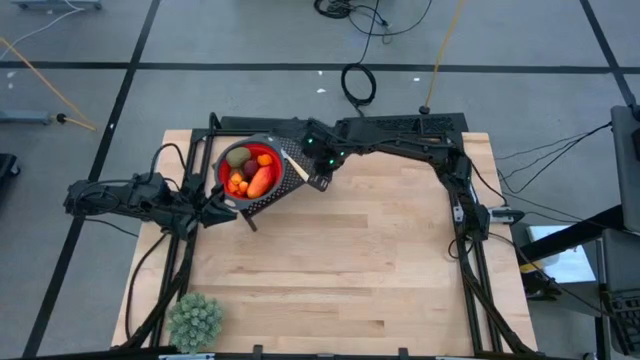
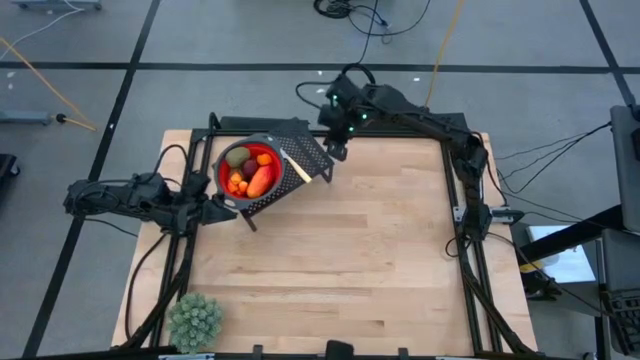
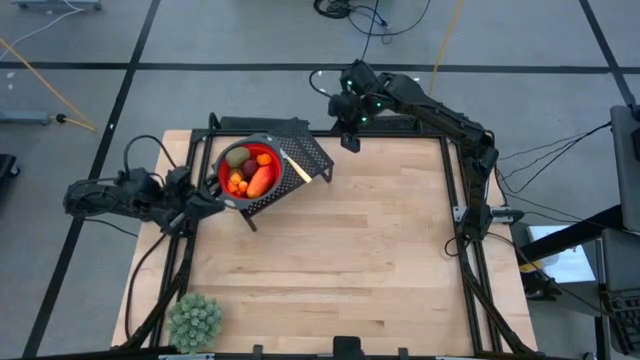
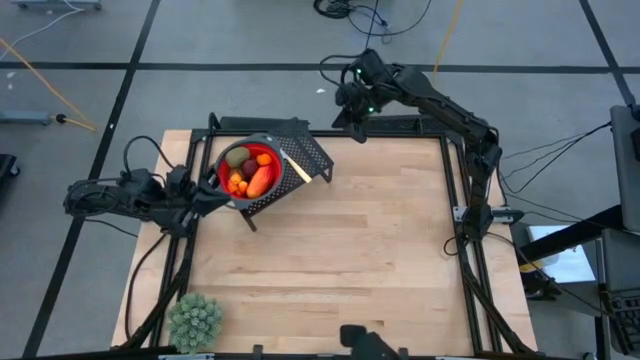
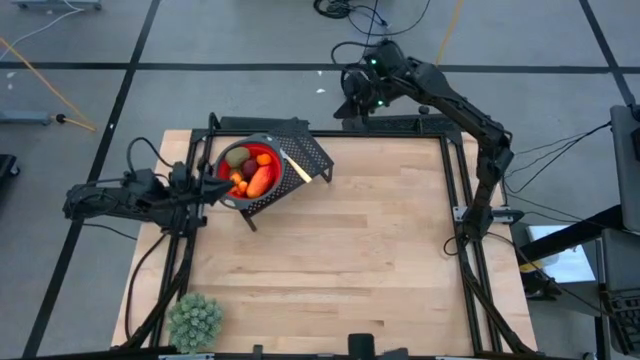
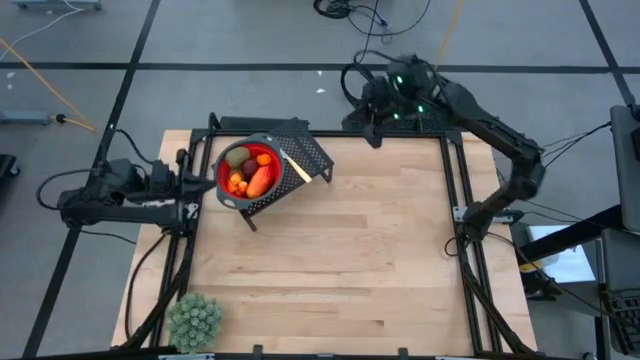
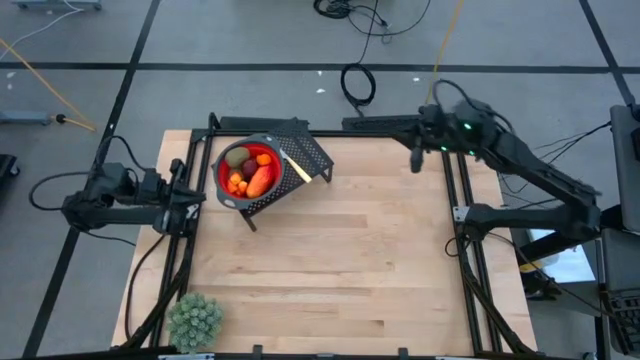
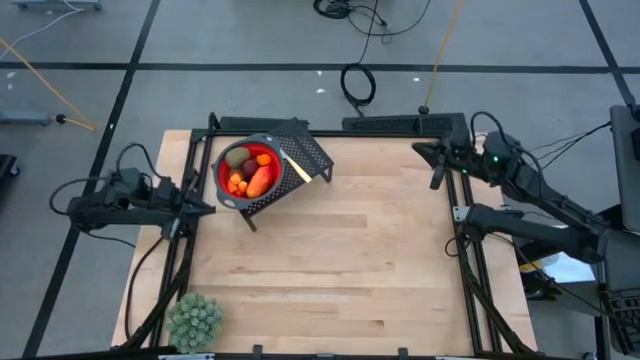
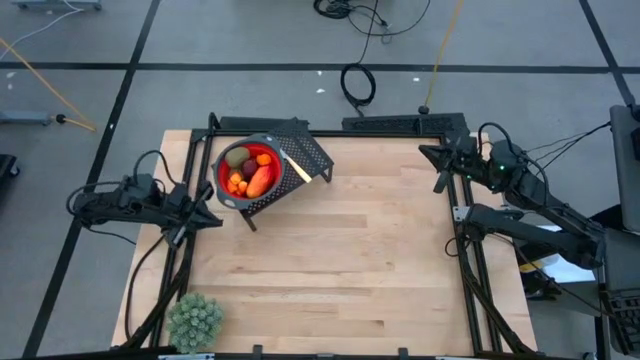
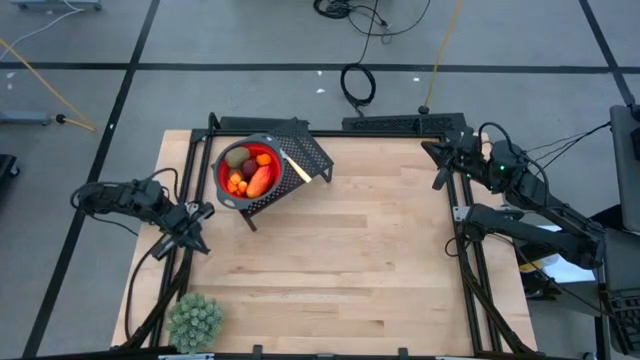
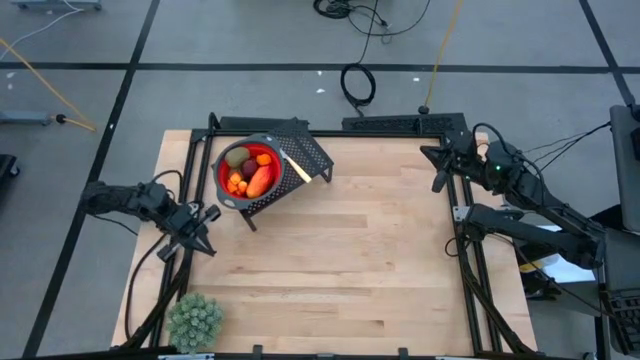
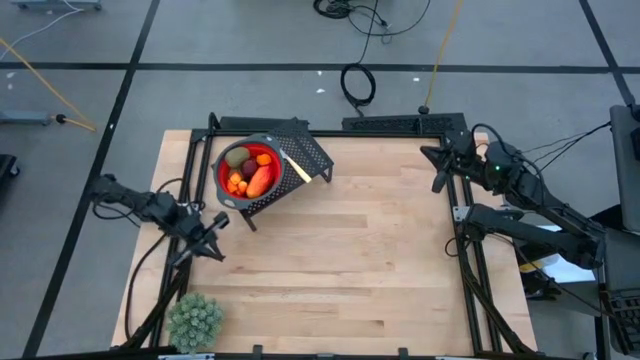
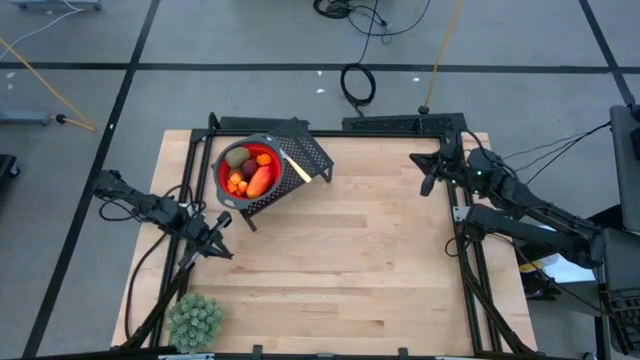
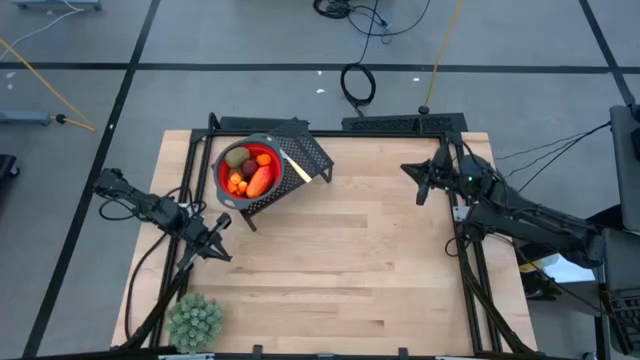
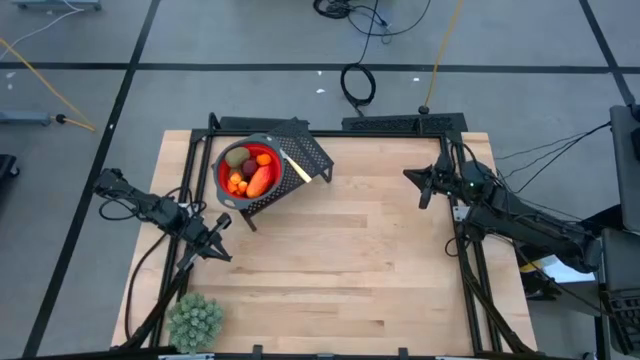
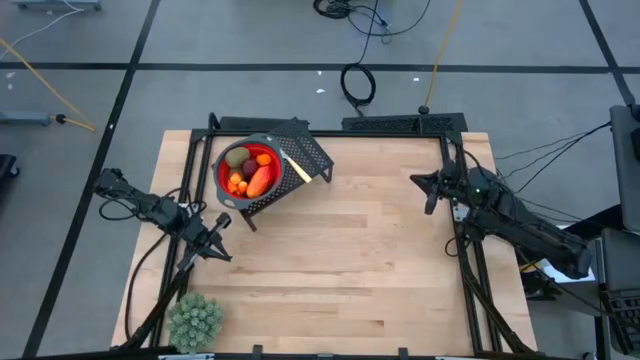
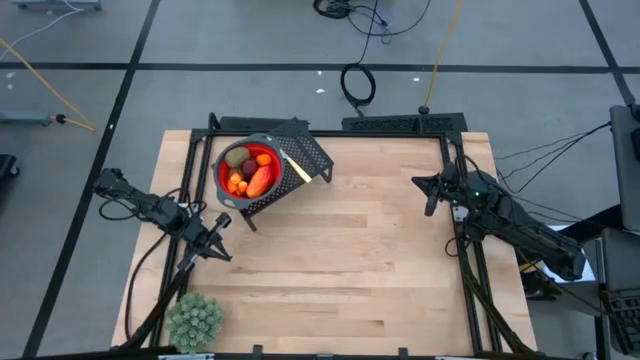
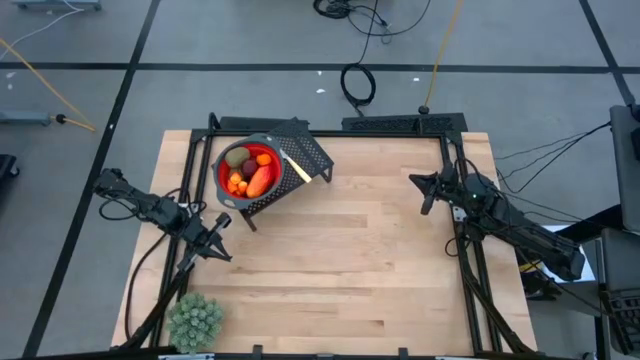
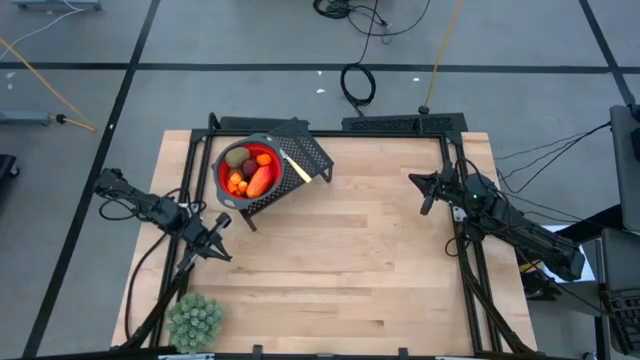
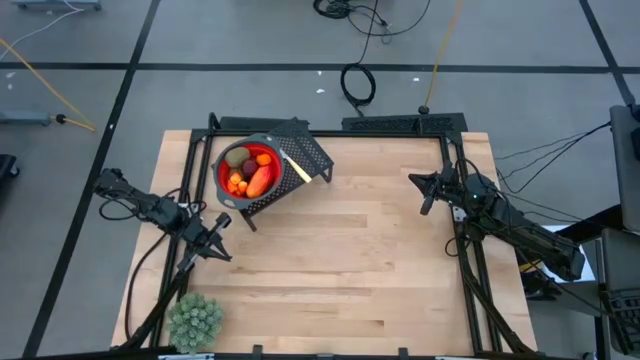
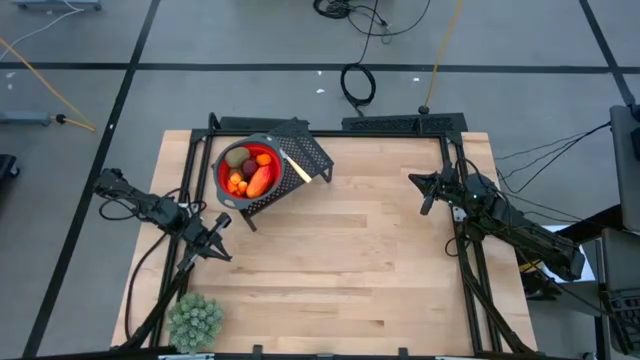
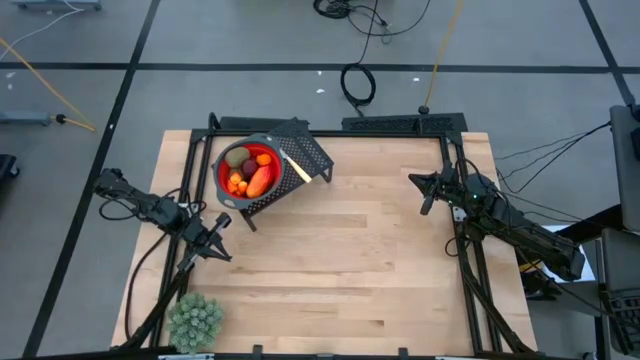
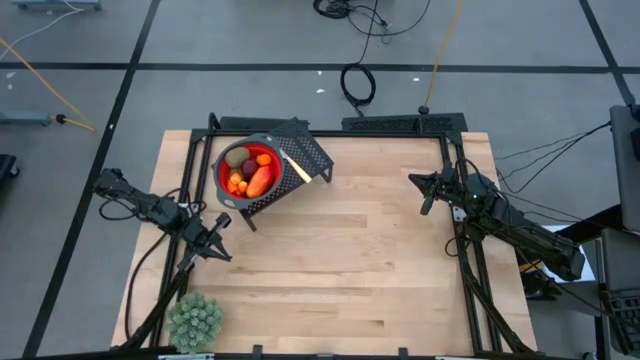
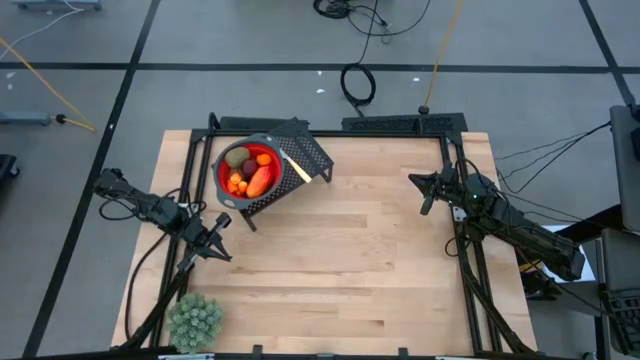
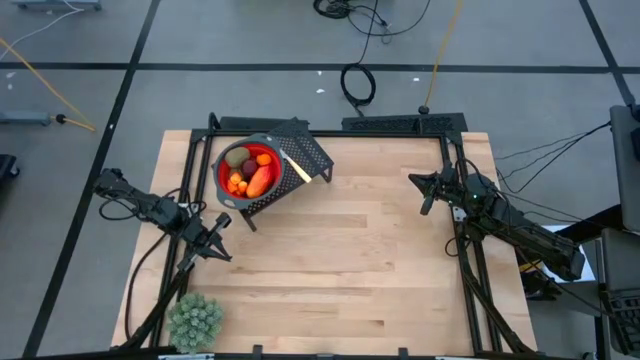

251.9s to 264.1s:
Task: Pick & Place Fruit
Return to Home Position

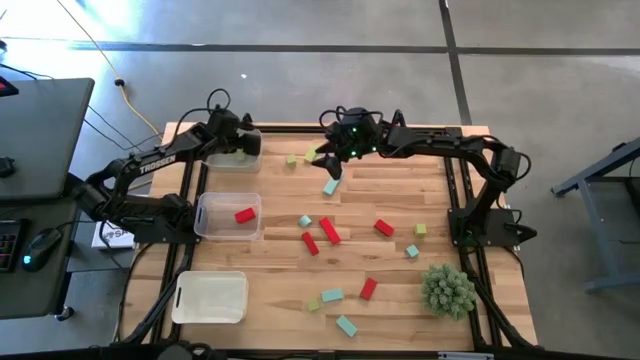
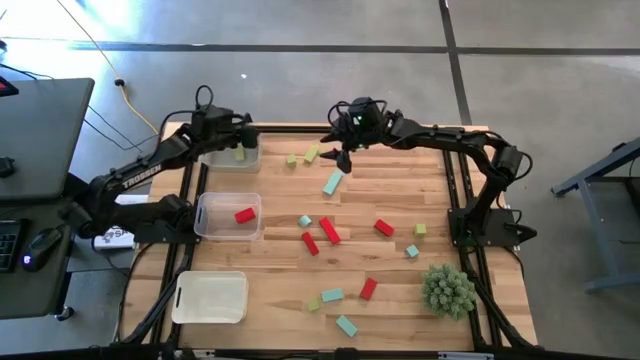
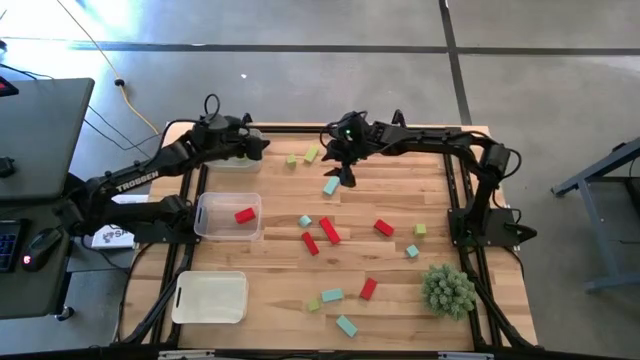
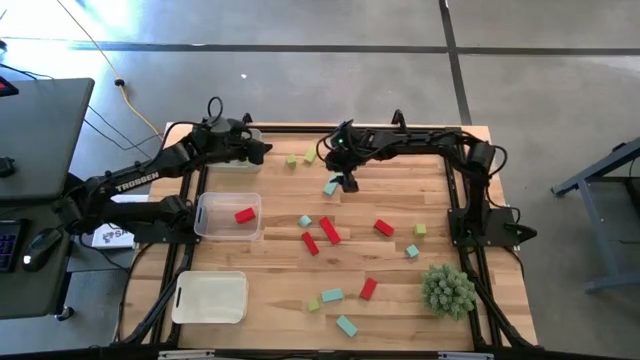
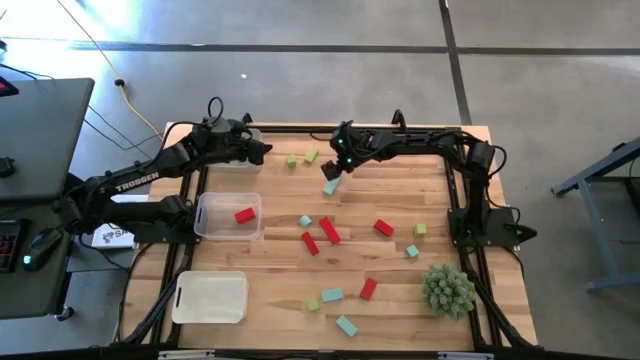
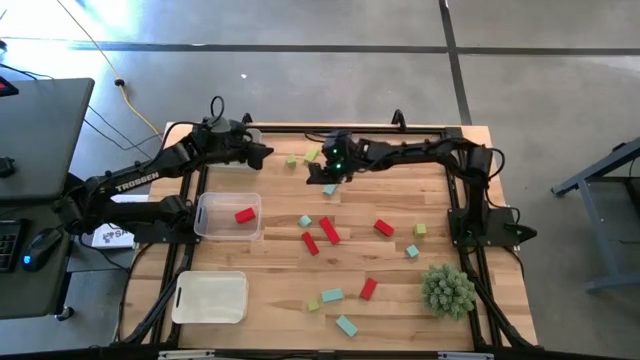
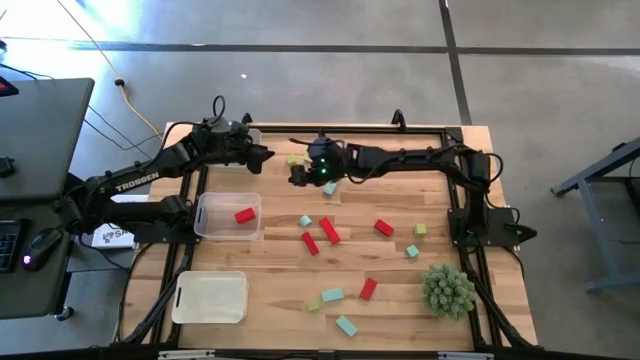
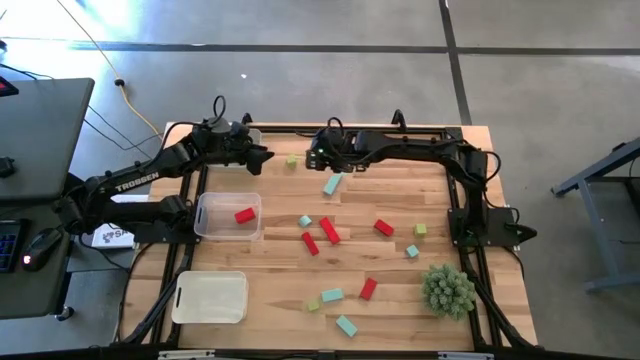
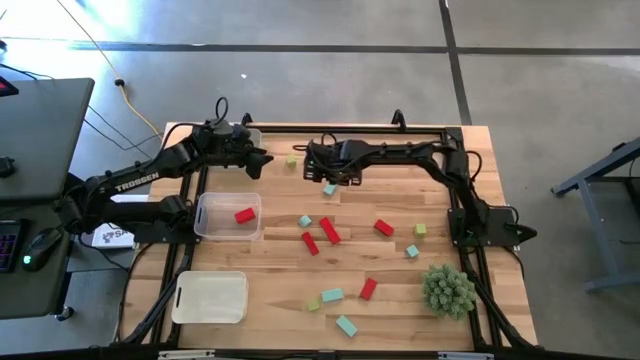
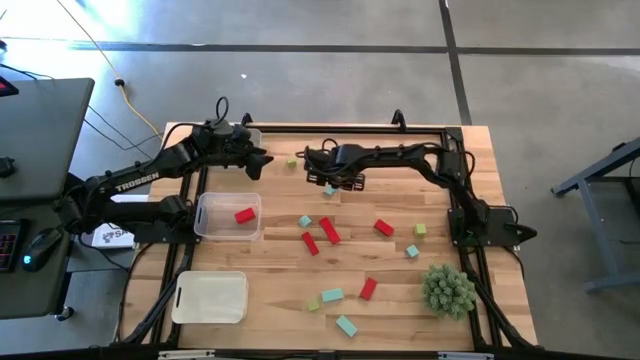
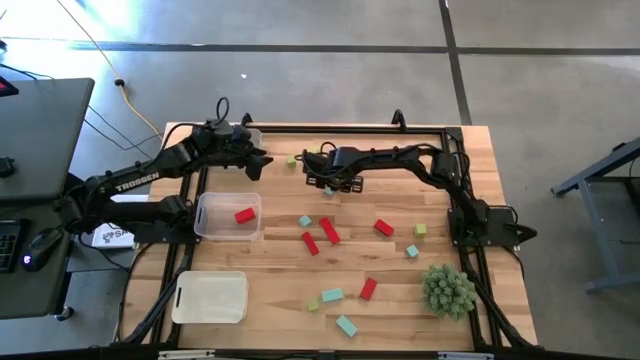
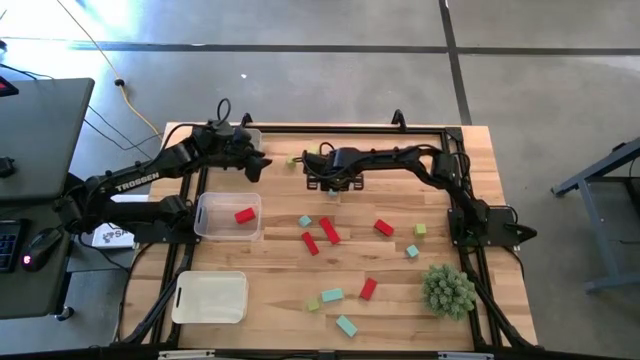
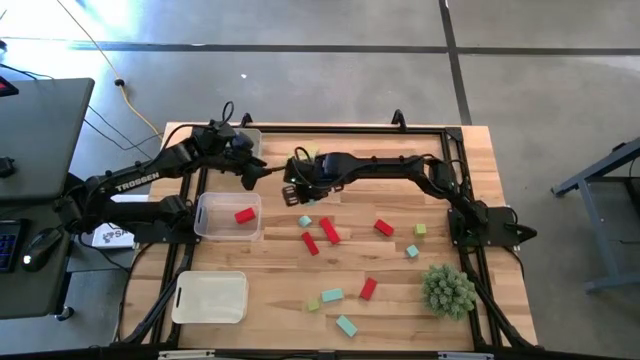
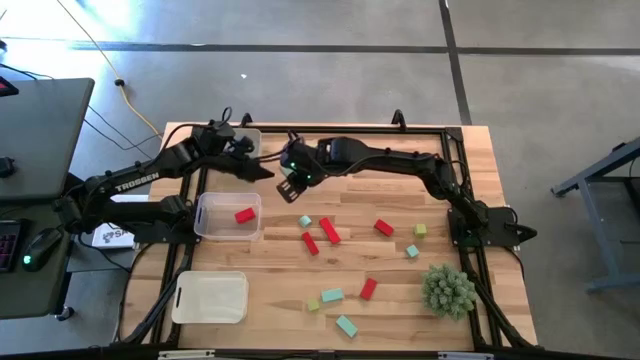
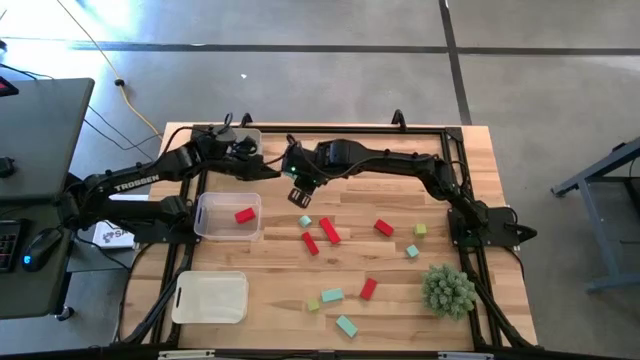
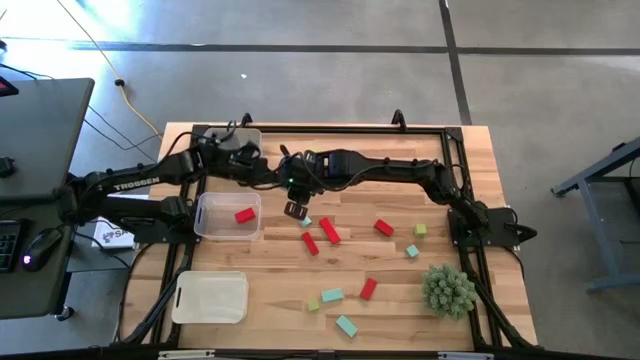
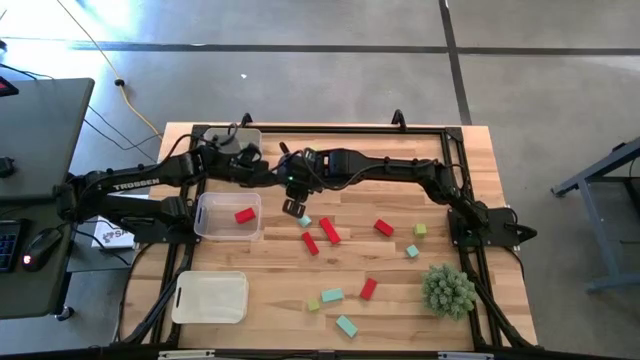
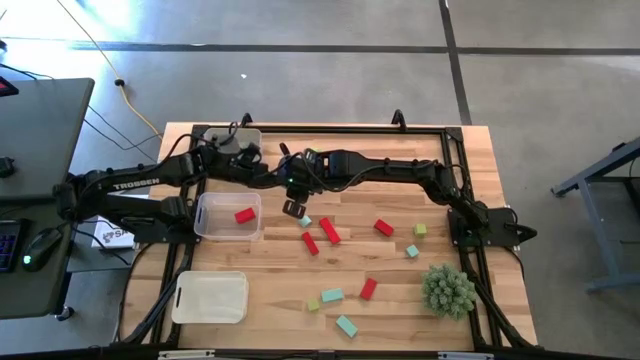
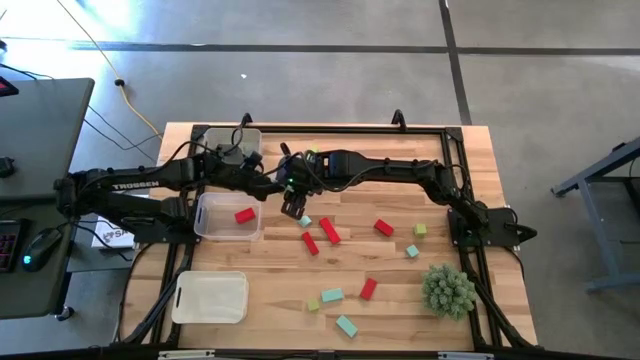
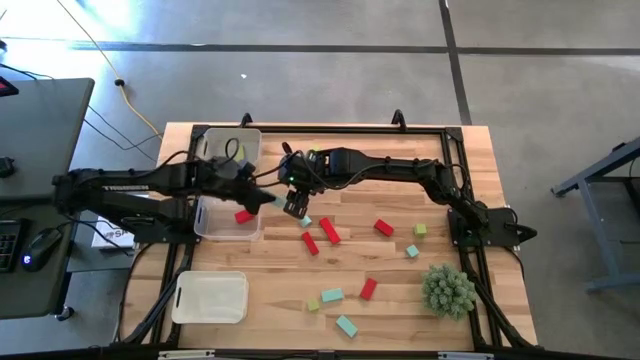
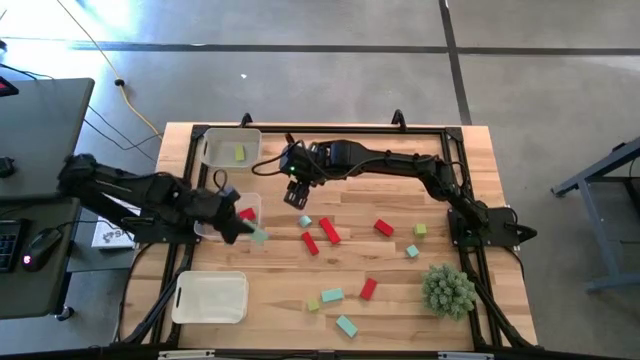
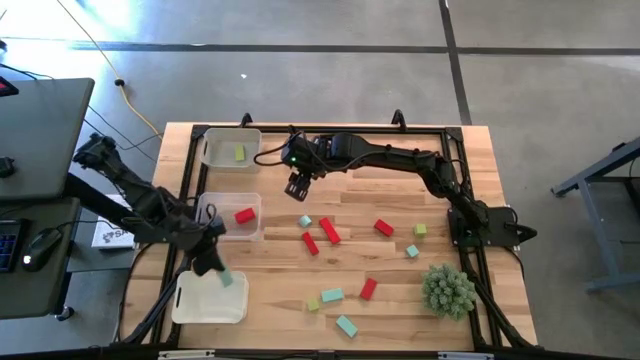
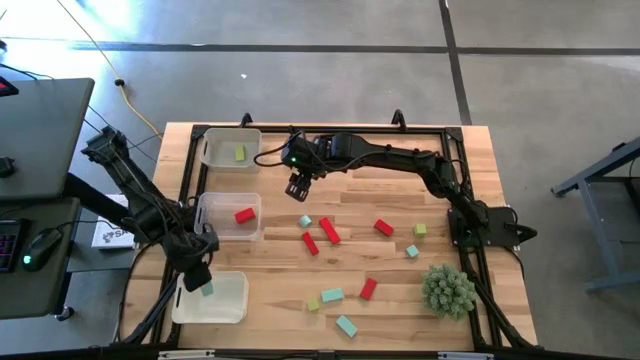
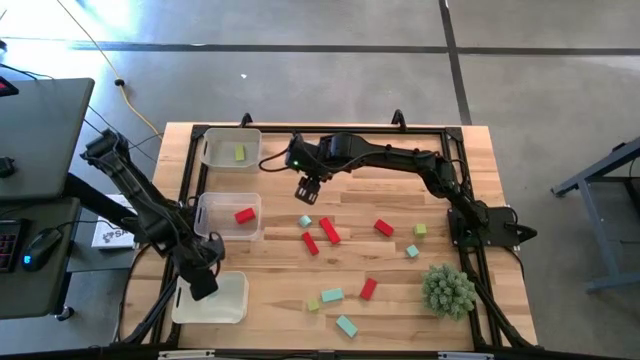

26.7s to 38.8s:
Task: Sort & place blocks by color
Put the light blue block into the white bin
